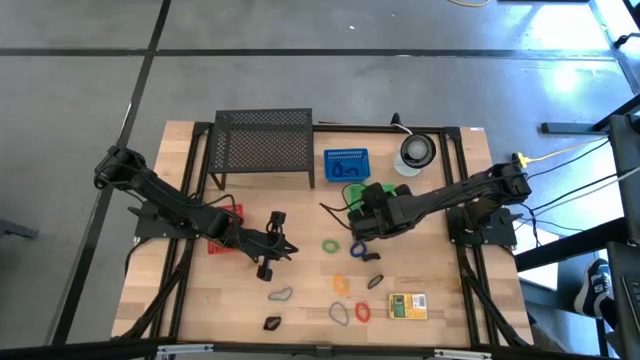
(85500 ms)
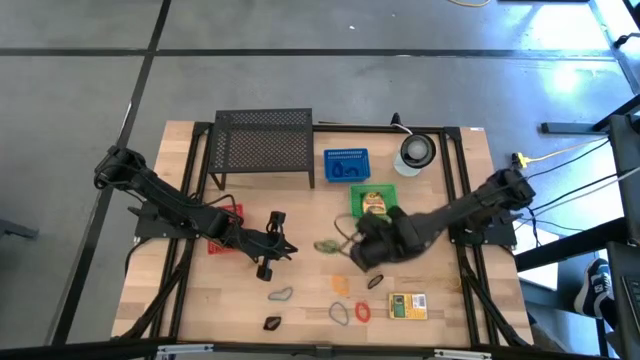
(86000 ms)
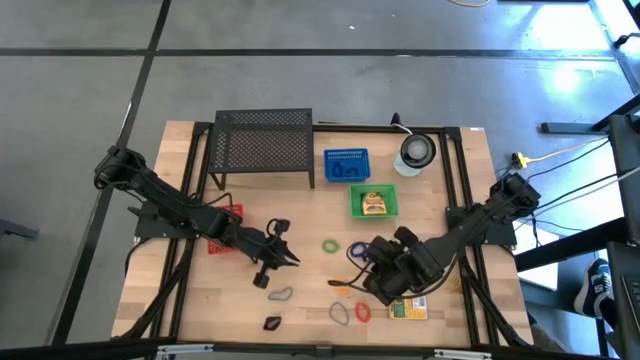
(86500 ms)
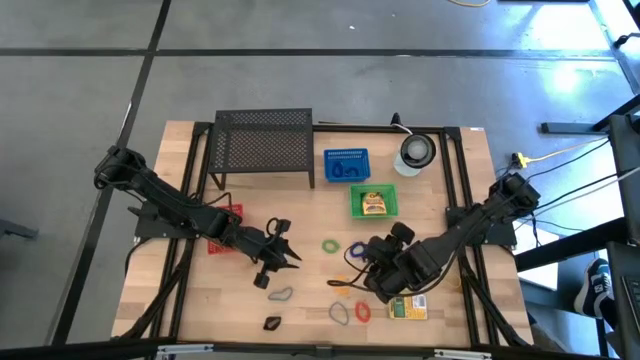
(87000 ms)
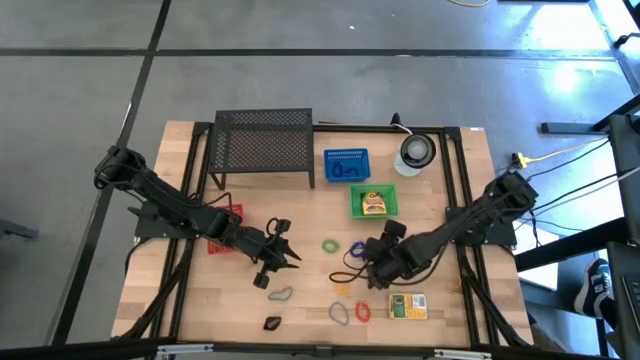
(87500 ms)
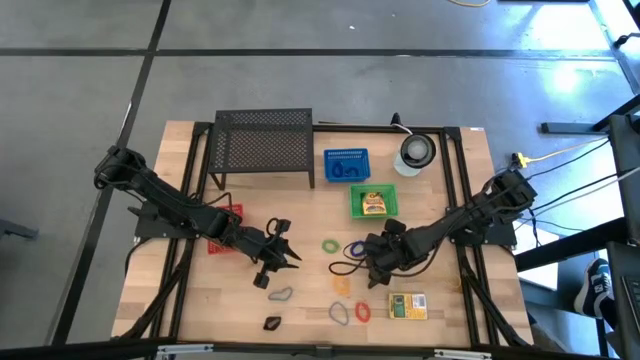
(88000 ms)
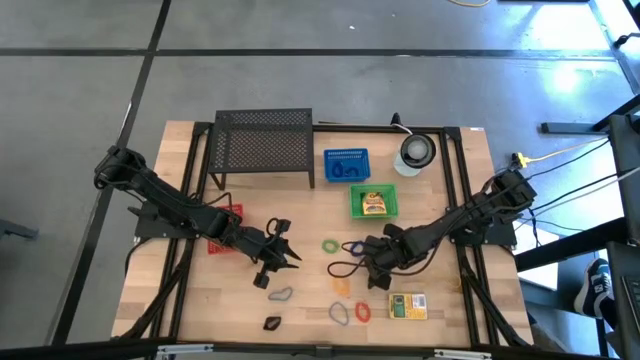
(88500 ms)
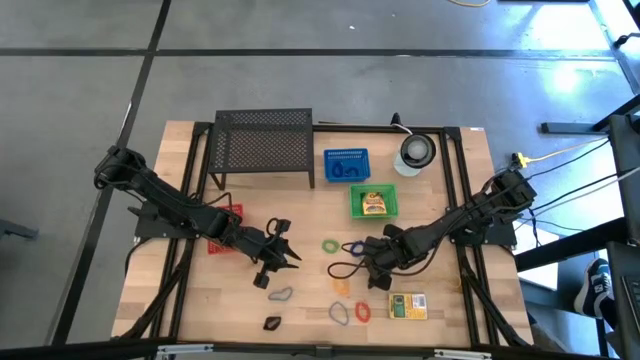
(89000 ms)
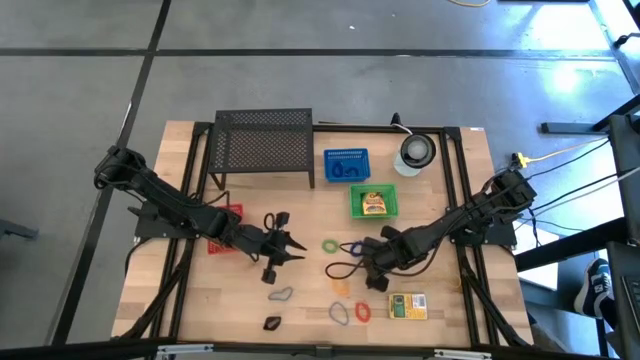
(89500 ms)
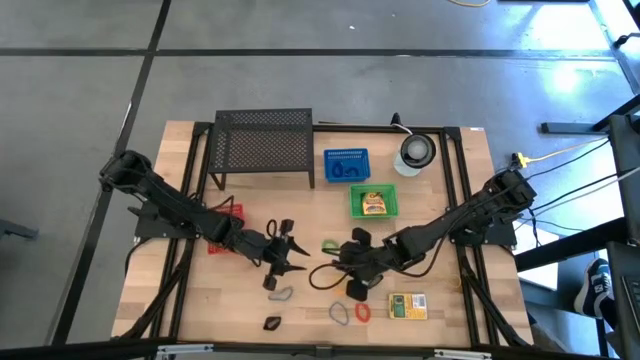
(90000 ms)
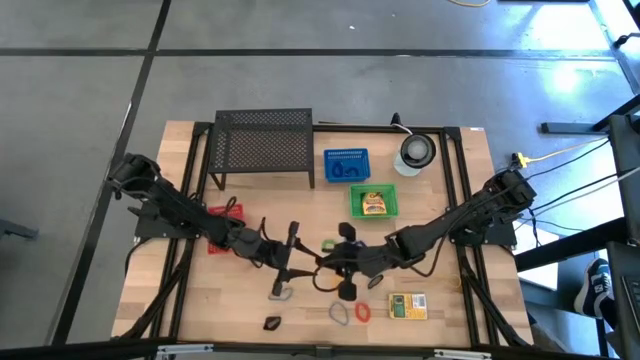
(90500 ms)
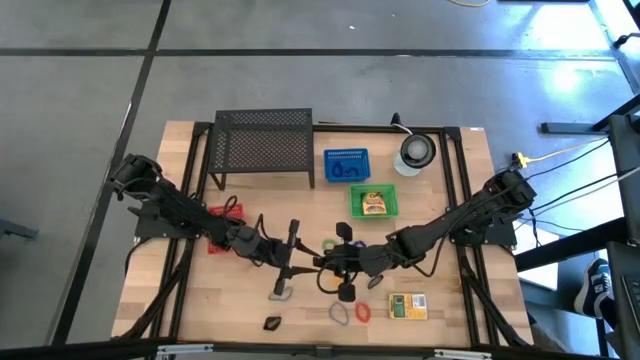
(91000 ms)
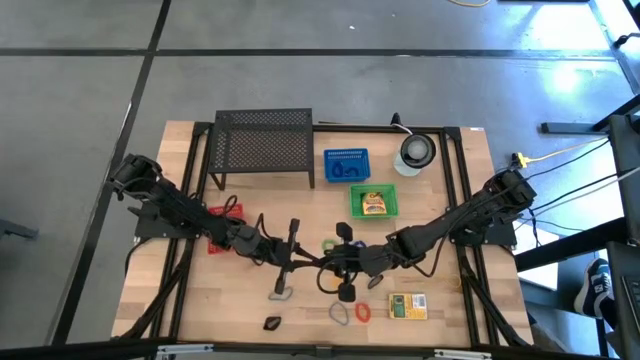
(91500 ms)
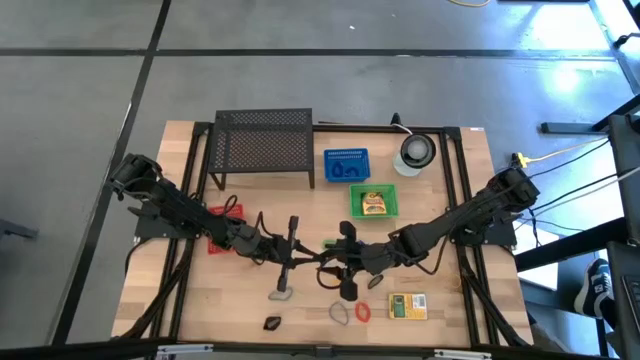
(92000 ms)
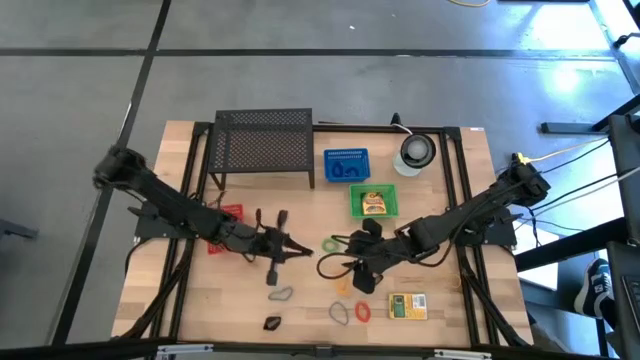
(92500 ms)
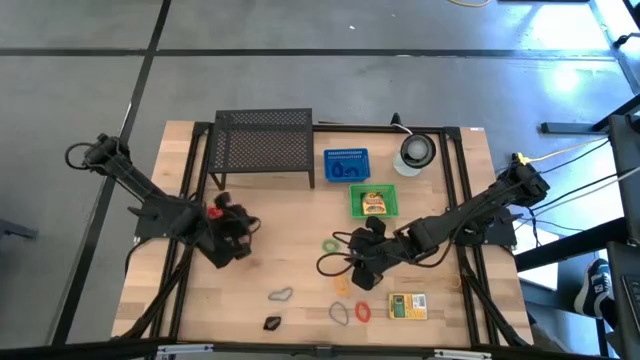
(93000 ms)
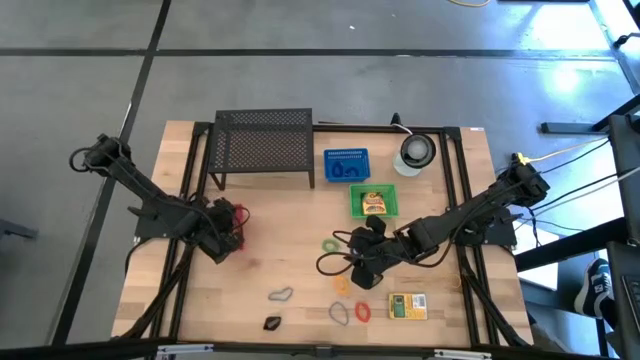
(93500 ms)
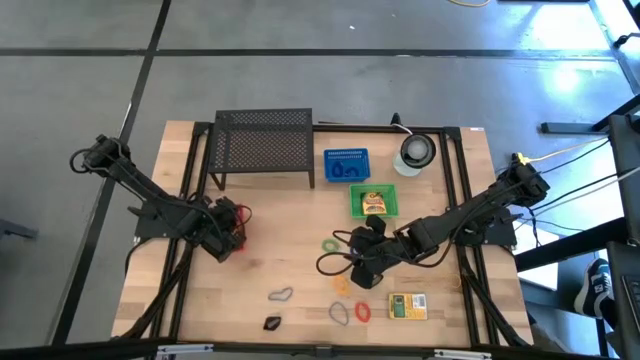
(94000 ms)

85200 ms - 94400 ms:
Task: Pick & Place Office Desk Supplies
Put the black rubber band into the orange basket

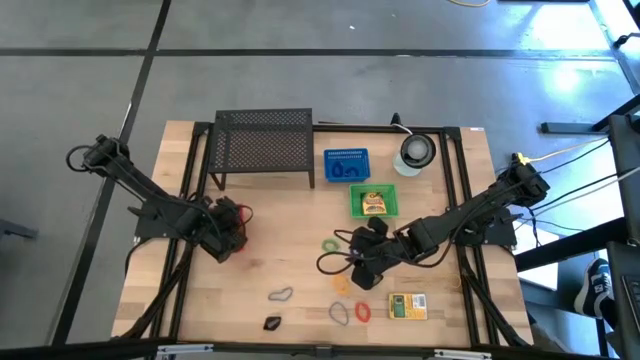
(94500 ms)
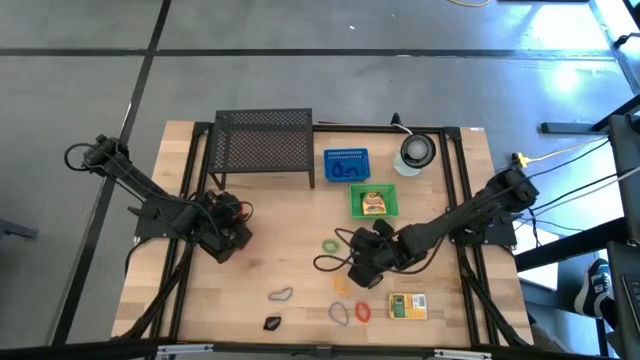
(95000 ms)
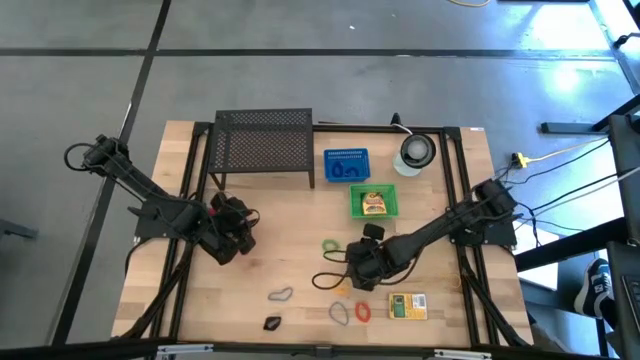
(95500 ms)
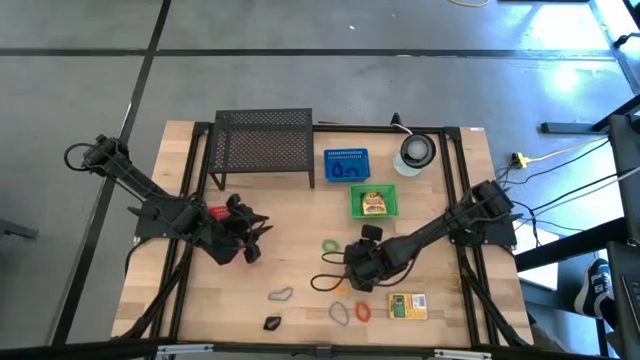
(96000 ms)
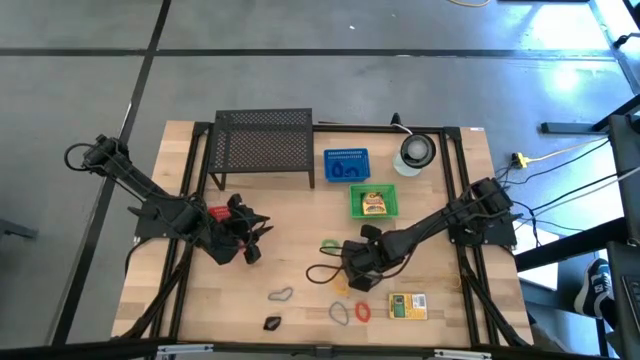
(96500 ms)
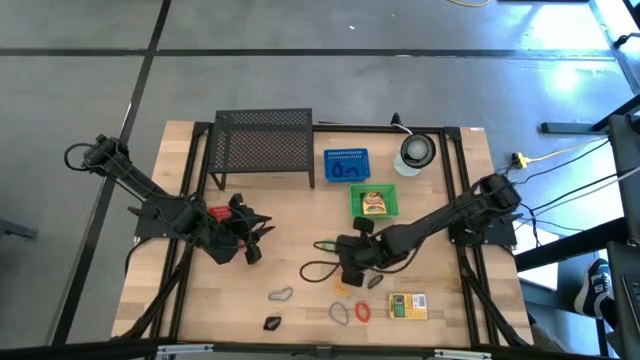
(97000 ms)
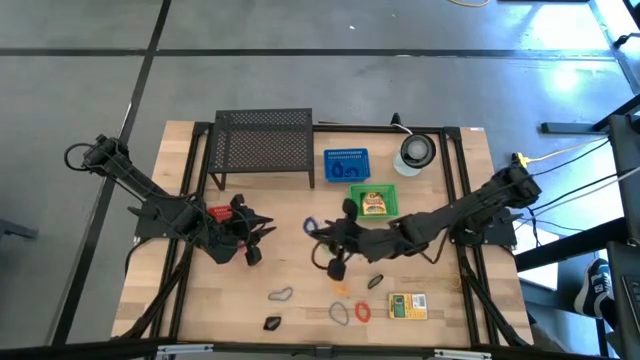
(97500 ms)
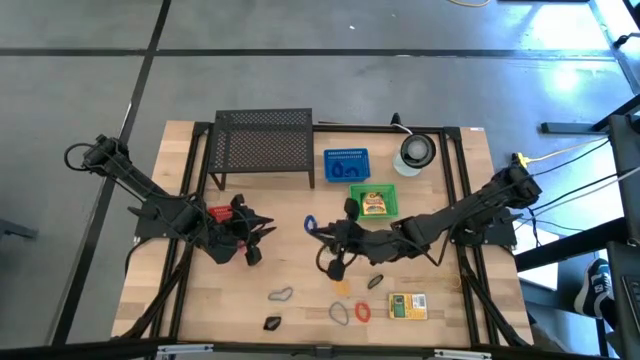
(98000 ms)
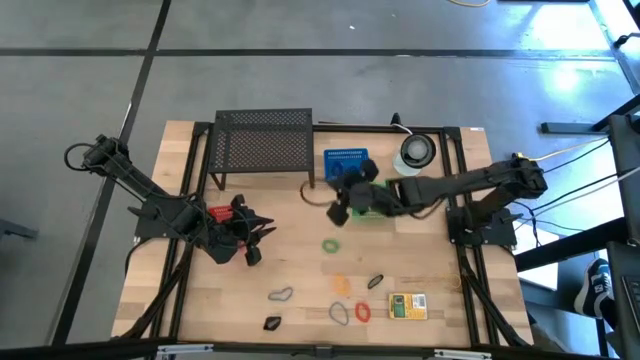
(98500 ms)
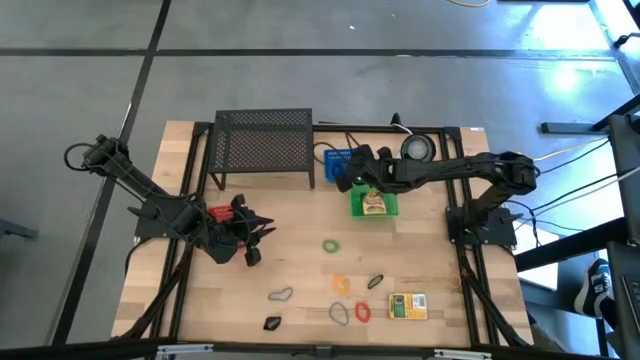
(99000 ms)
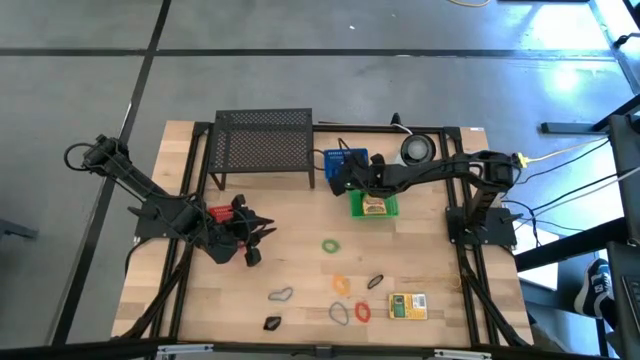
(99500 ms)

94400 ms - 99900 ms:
Put the blue spring keychain into the blue basket

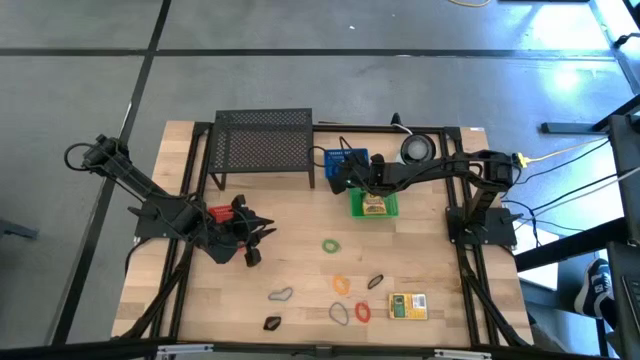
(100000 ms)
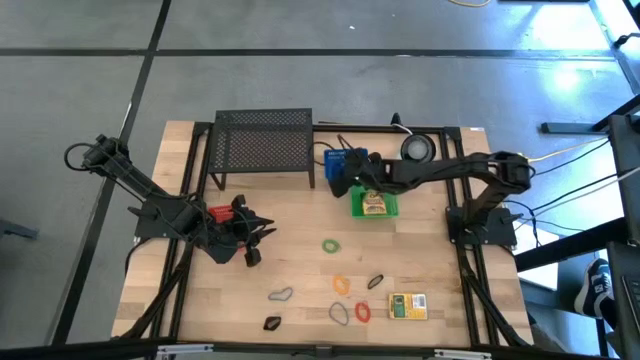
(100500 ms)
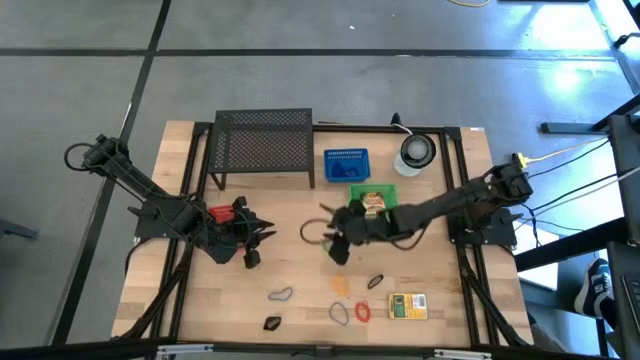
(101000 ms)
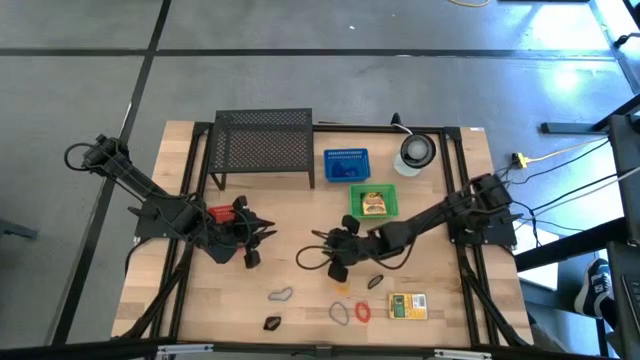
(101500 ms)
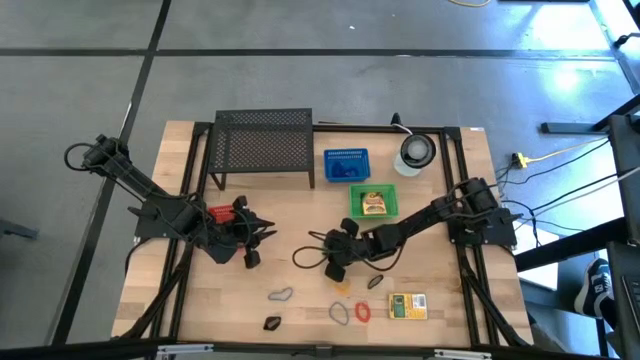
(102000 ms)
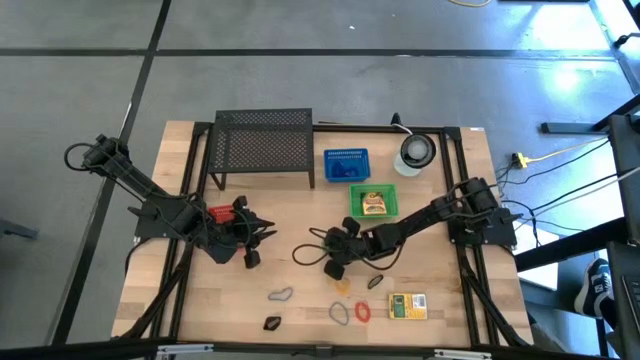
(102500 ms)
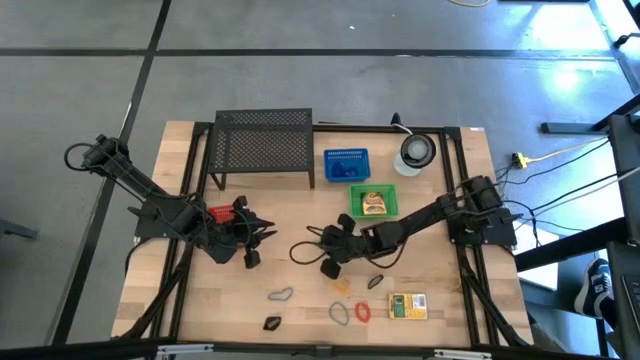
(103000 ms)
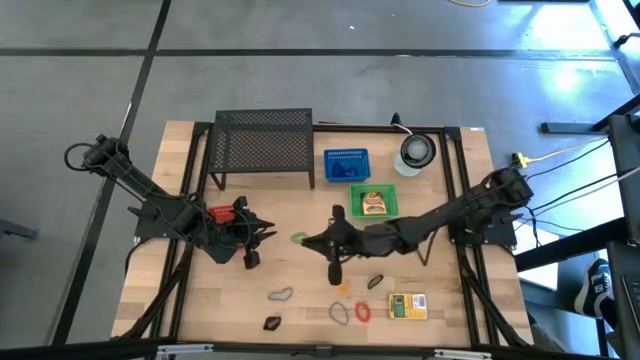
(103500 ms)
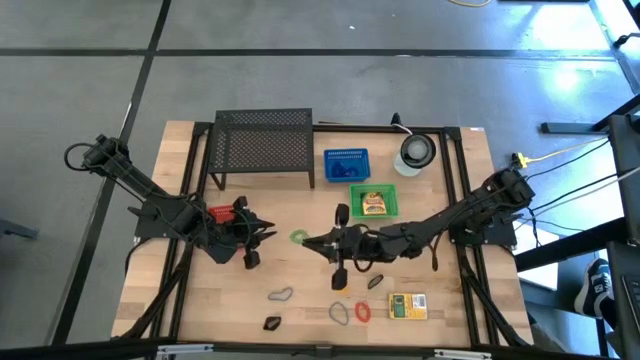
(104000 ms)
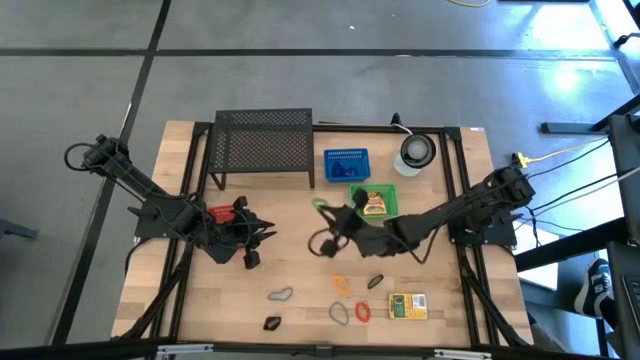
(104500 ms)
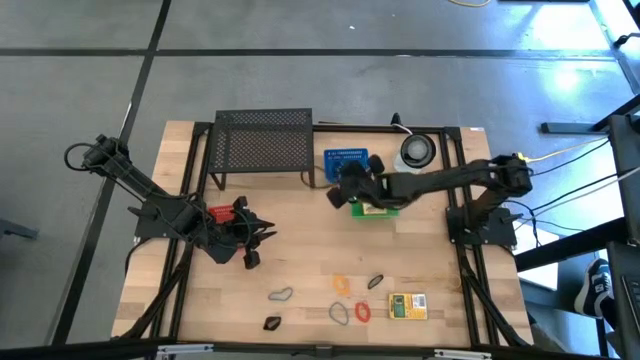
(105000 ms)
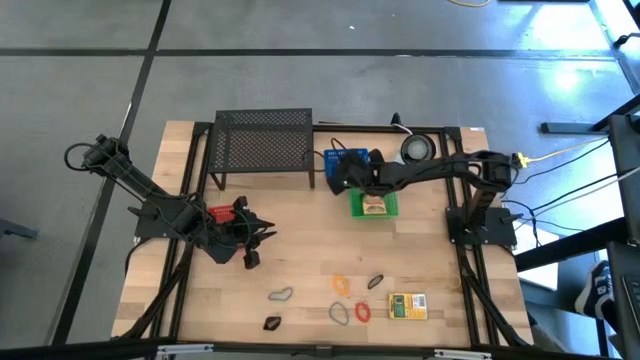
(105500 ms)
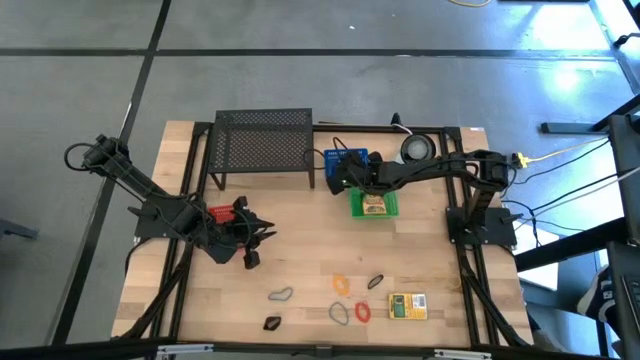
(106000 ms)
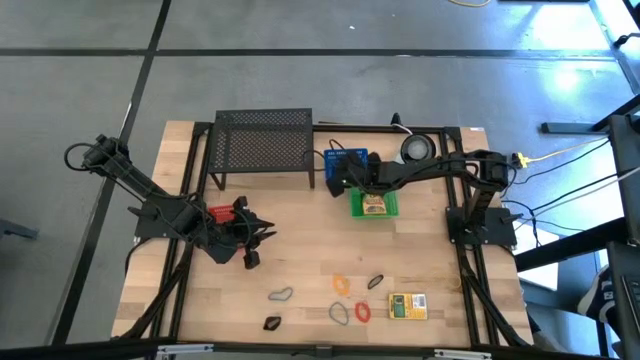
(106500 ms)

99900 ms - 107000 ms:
Put the green spring keychain into the blue basket
